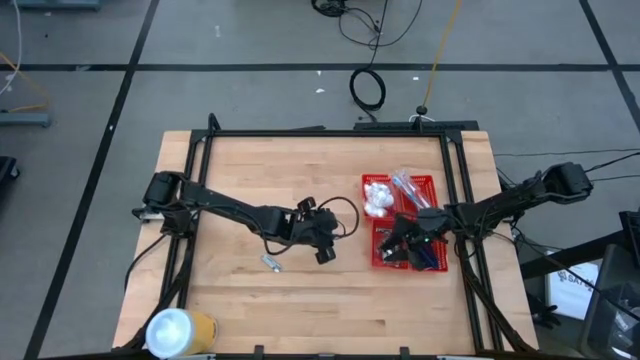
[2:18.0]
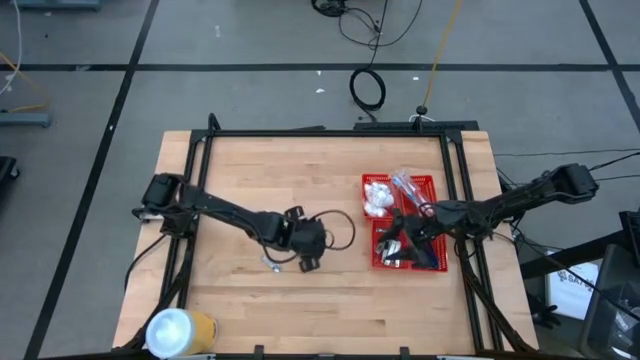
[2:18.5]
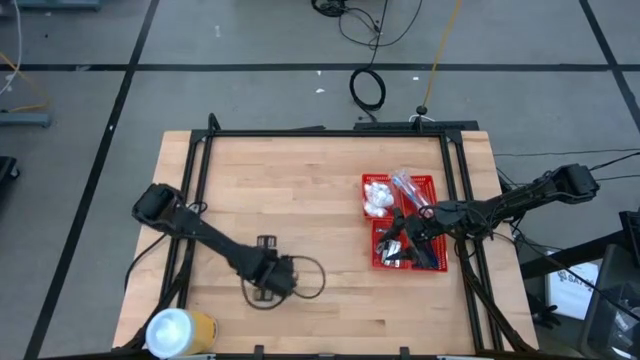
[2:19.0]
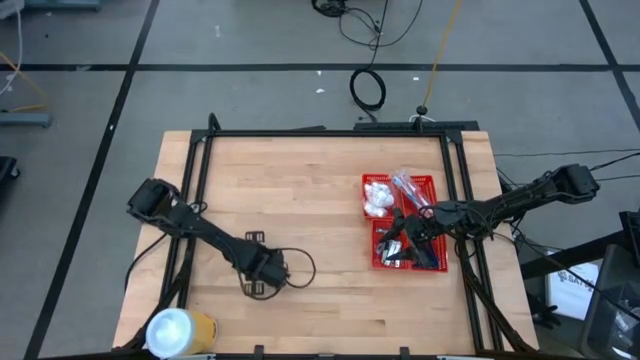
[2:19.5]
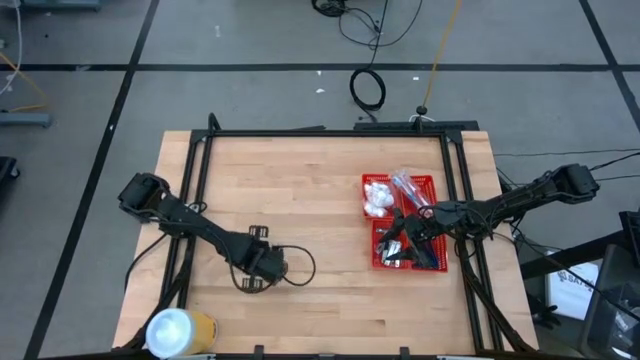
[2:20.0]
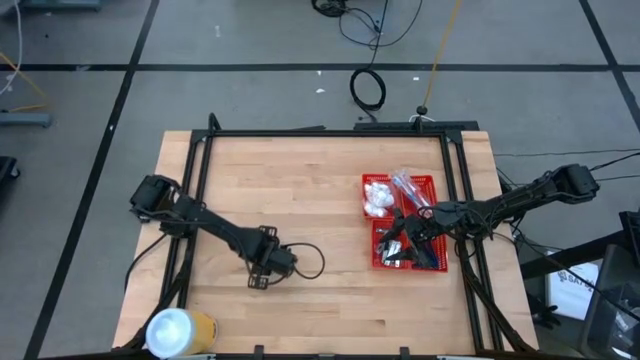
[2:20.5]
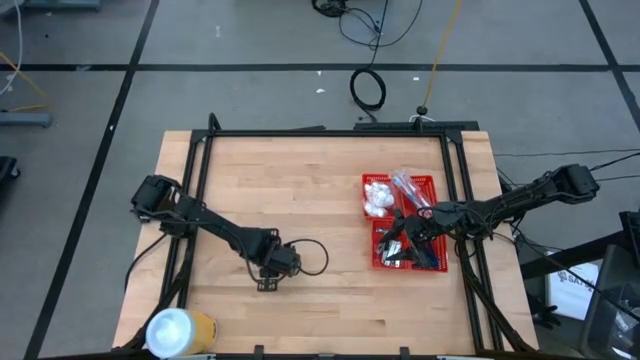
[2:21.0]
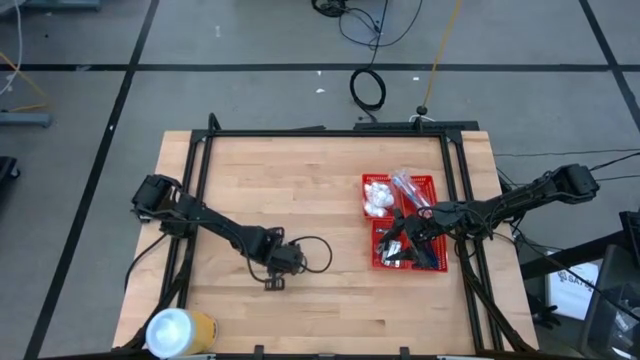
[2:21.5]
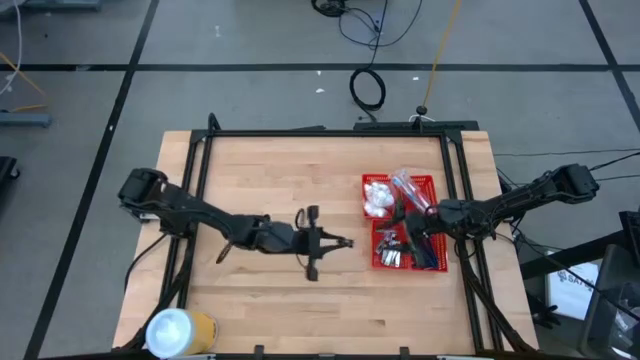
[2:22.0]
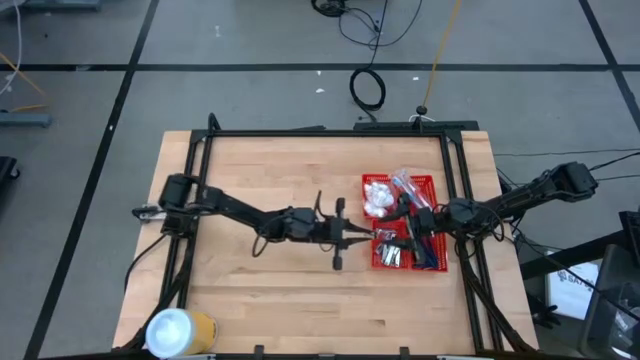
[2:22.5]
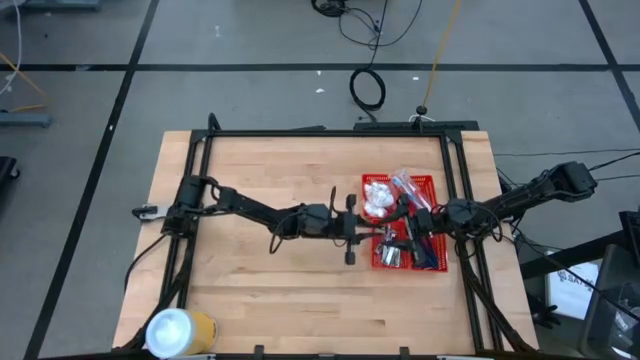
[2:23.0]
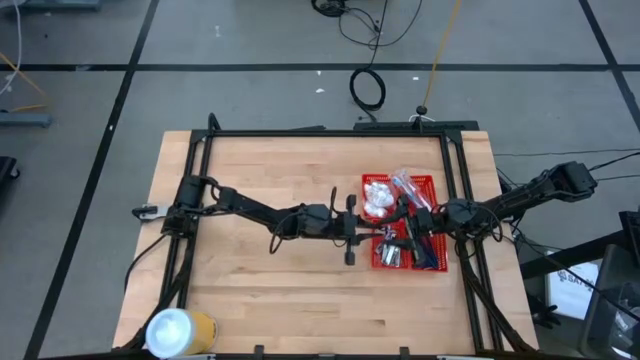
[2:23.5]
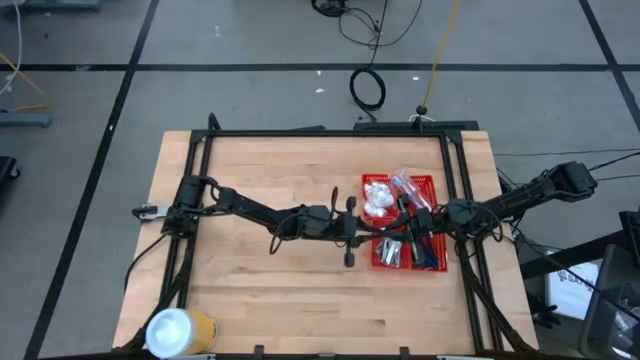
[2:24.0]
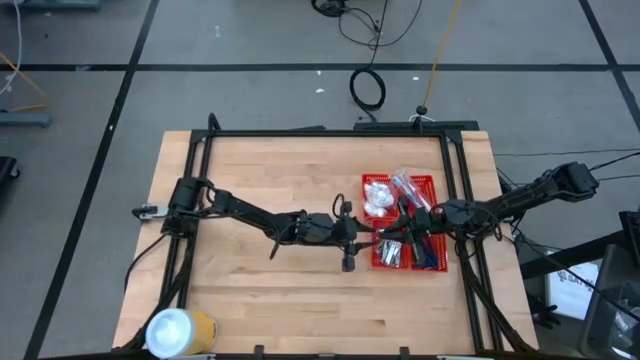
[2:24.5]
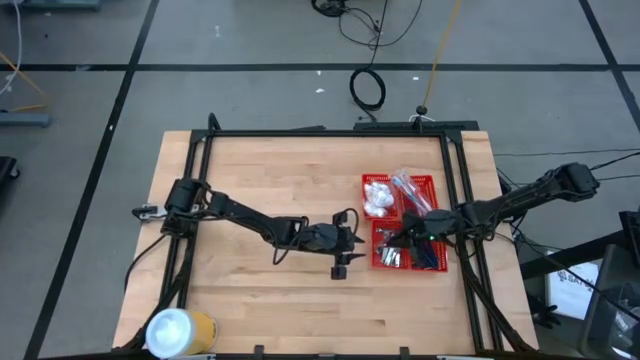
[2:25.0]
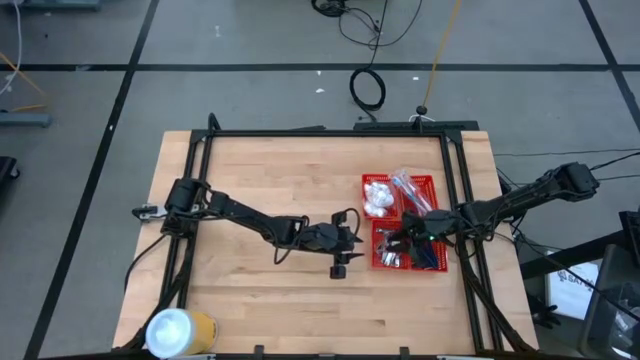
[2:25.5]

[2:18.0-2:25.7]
Task: Pick & Place Travel size toiletries
Put the nail cutter into the bottom left red bin

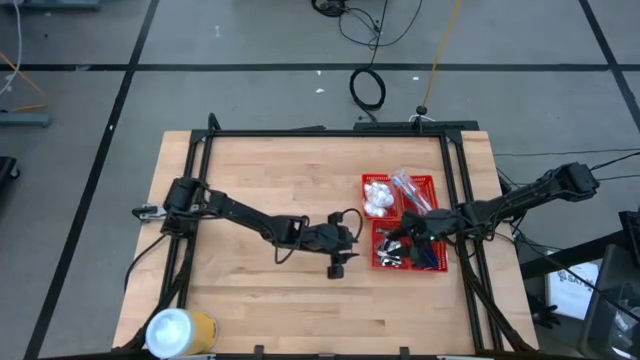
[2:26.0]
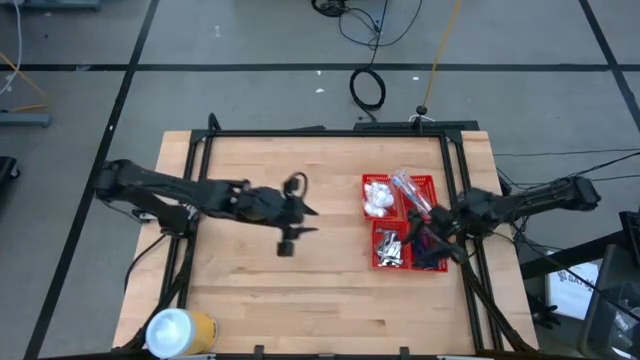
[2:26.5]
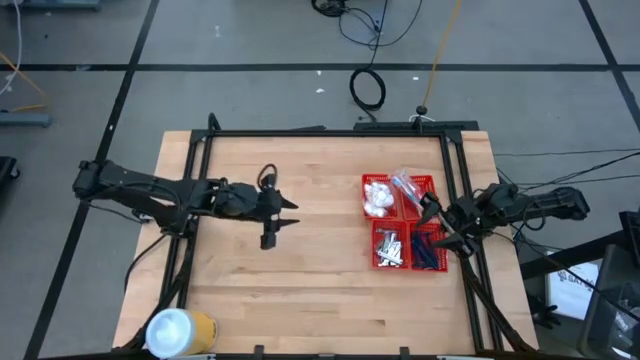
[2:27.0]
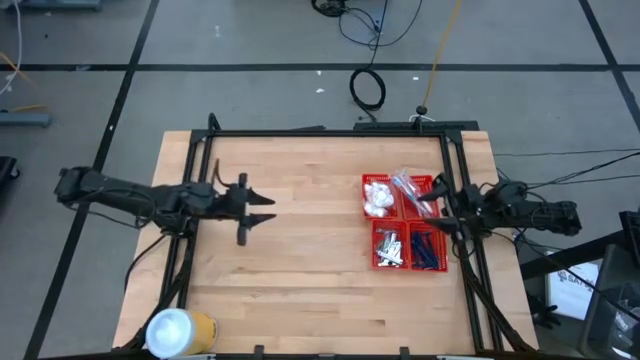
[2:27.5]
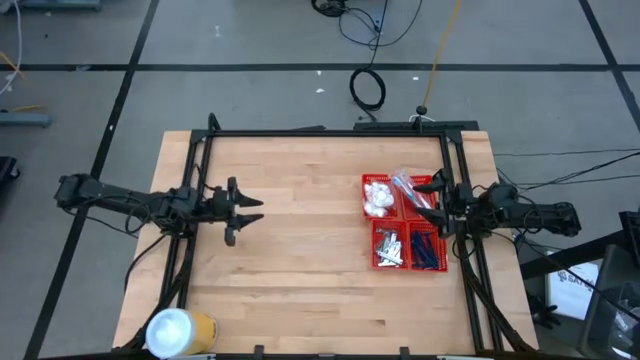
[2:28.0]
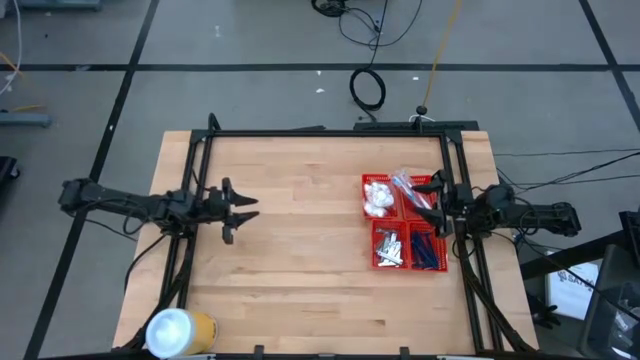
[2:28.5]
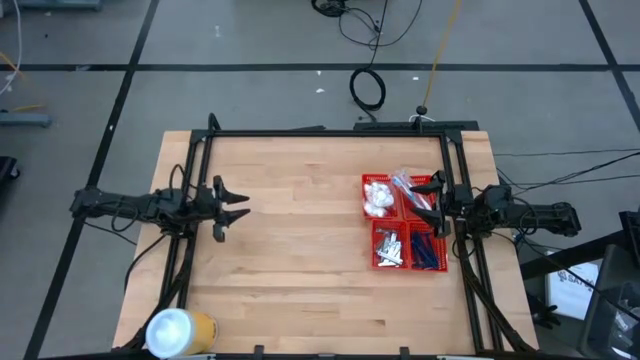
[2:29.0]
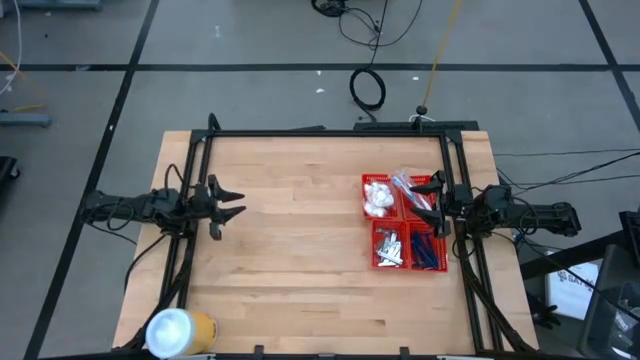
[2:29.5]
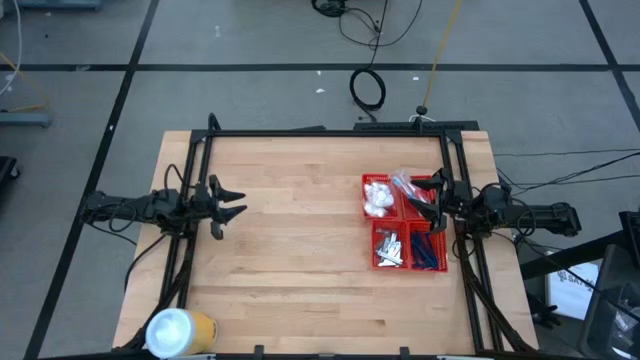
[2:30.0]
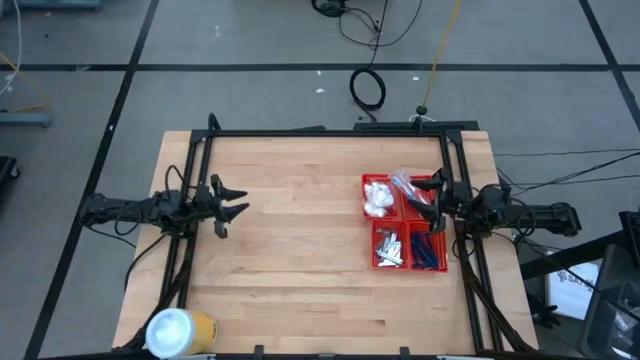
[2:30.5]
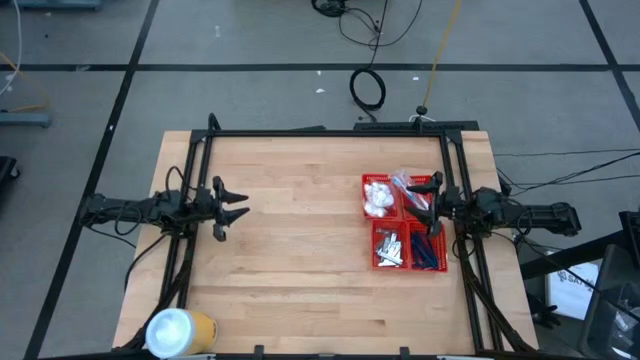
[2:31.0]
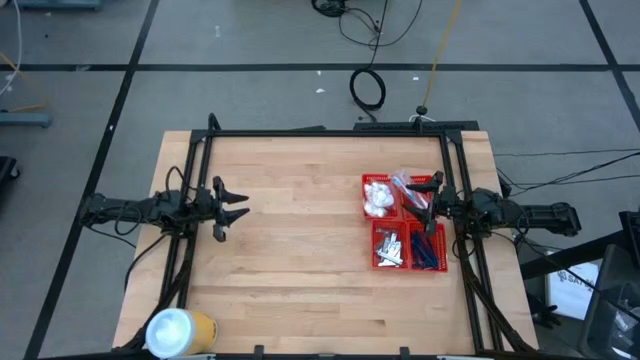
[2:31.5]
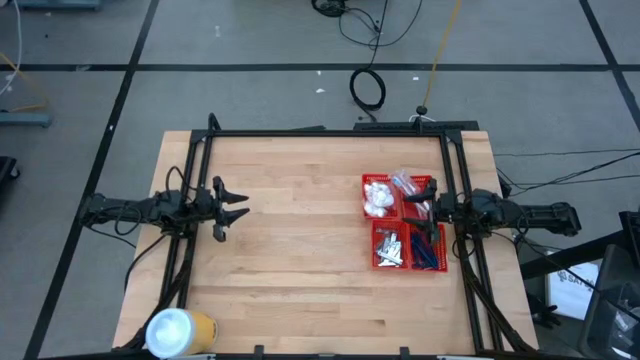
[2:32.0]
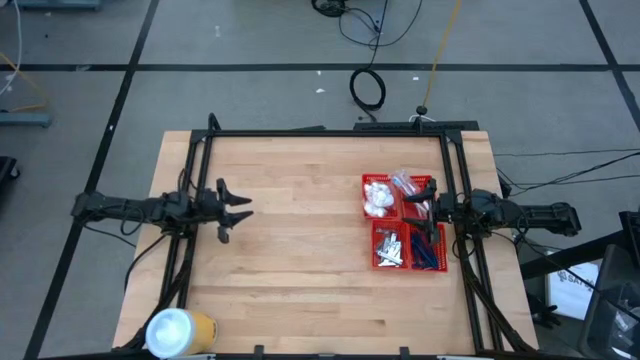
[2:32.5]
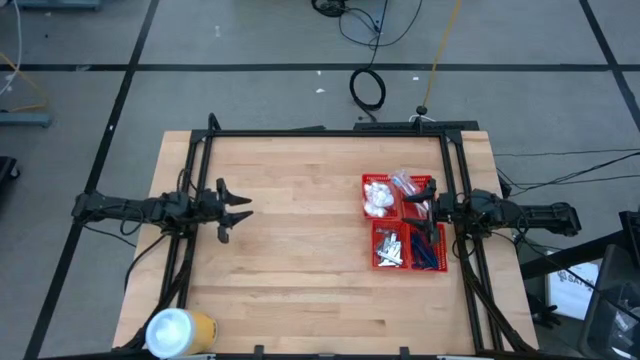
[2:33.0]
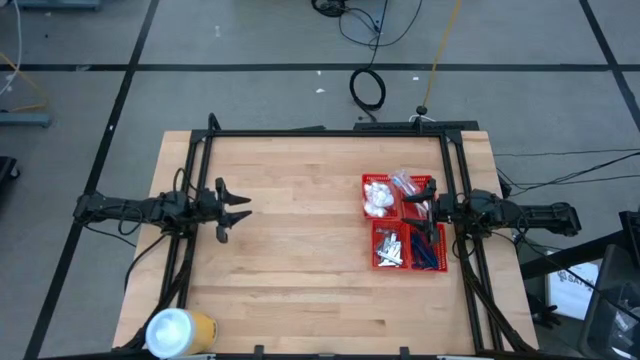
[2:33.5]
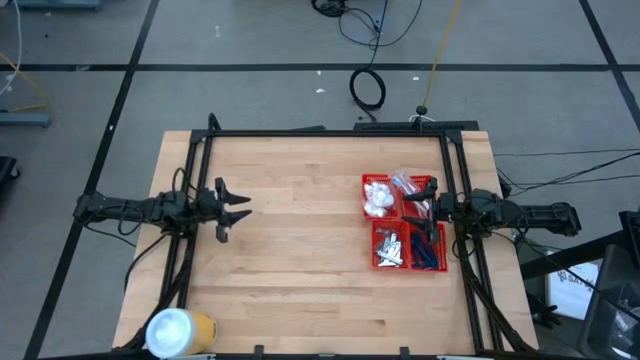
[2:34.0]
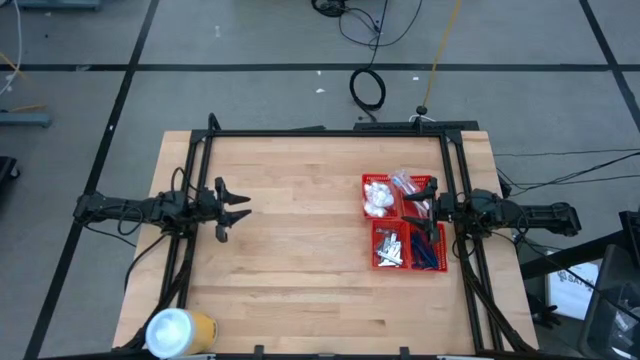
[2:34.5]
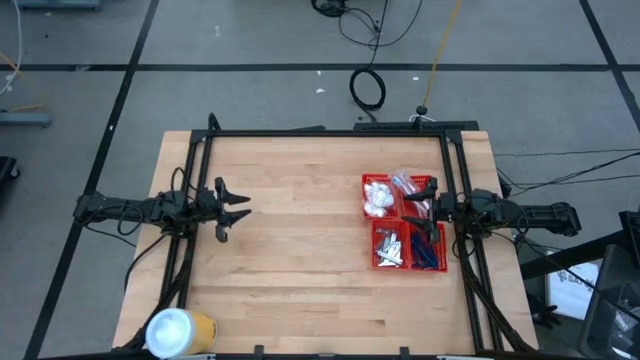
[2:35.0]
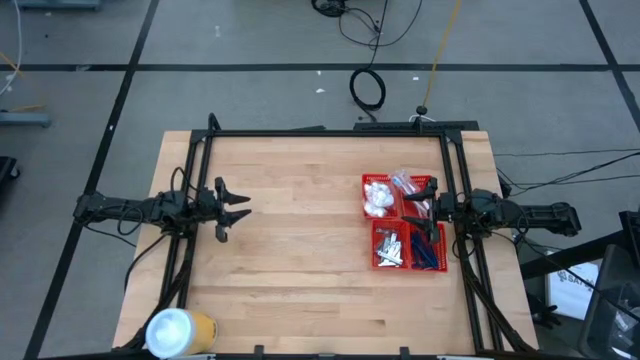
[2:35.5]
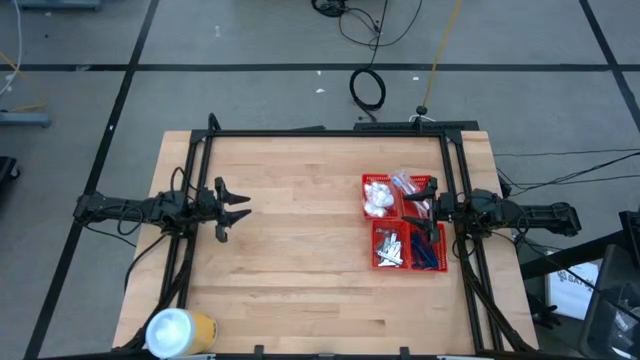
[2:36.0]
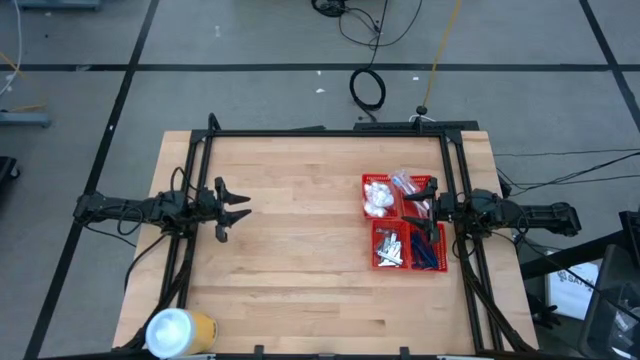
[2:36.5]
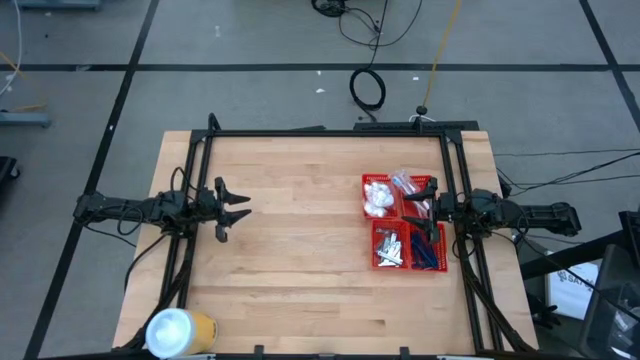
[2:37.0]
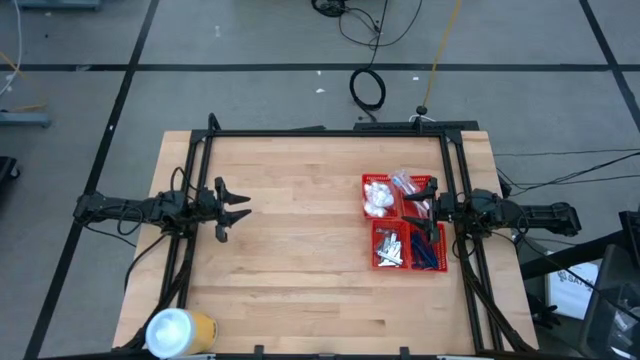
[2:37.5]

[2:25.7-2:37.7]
Return to Home Position

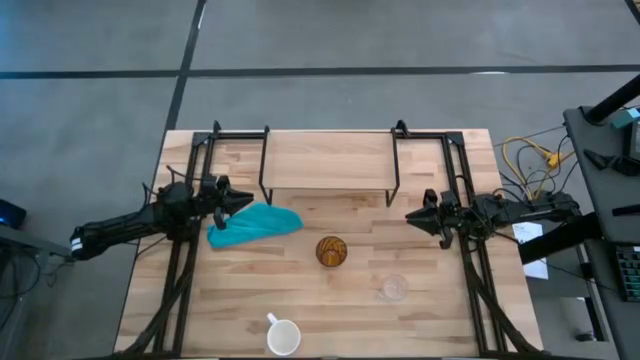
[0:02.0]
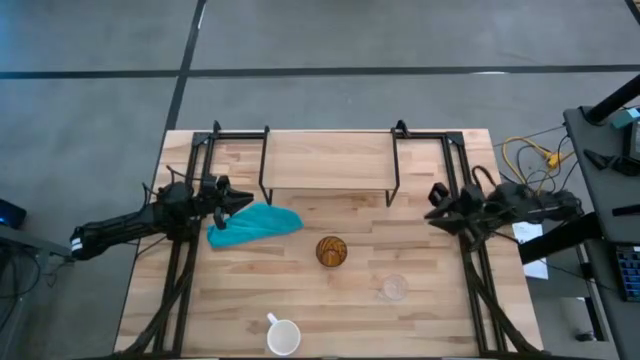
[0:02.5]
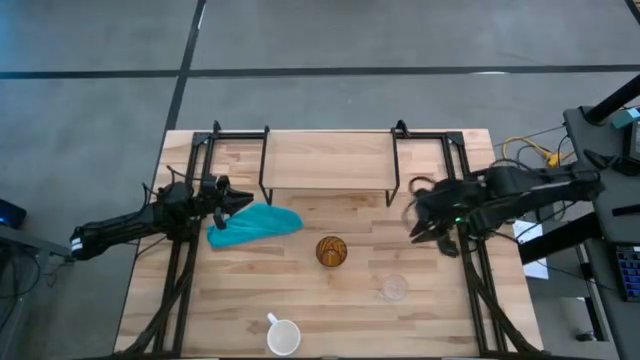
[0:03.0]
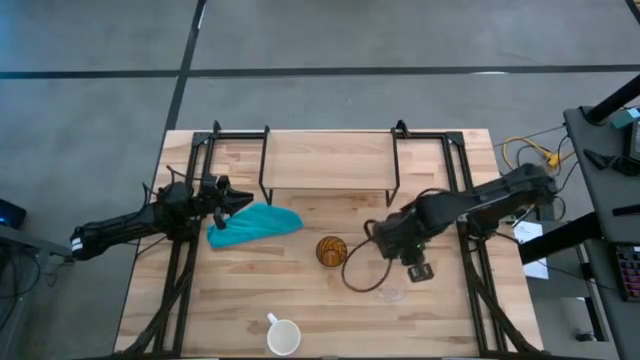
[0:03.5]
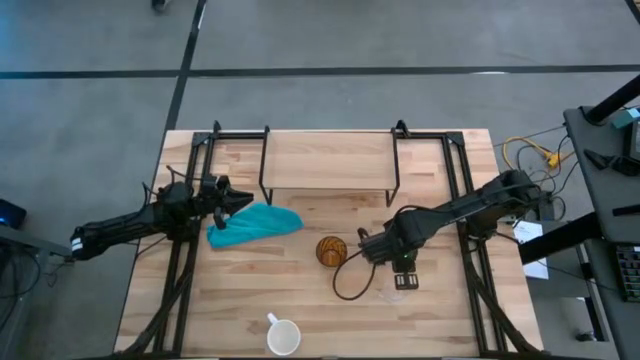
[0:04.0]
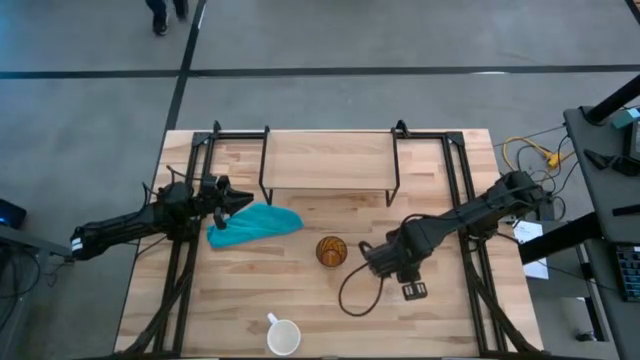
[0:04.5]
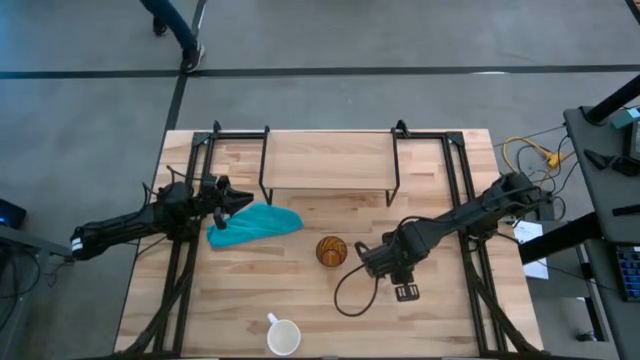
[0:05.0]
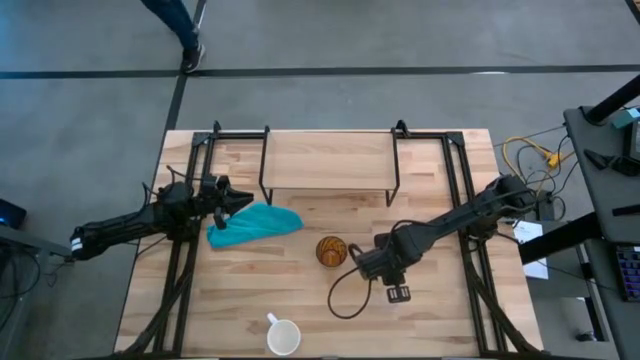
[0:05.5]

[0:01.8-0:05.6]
Task: Stack small to large cups/mugs on shelf
Put the transparent mug on the shelf
